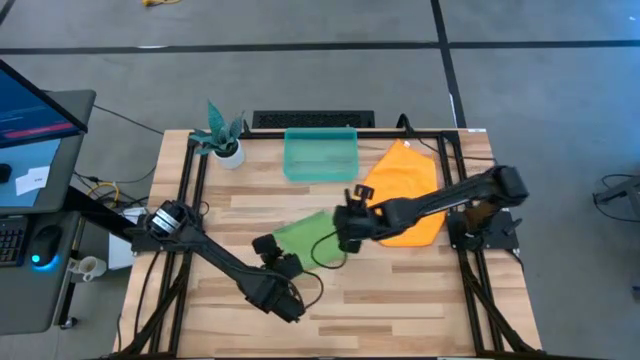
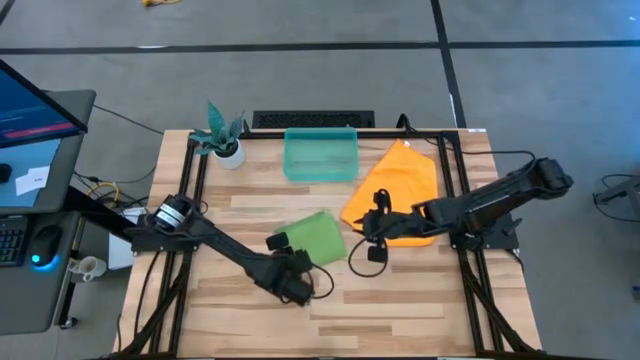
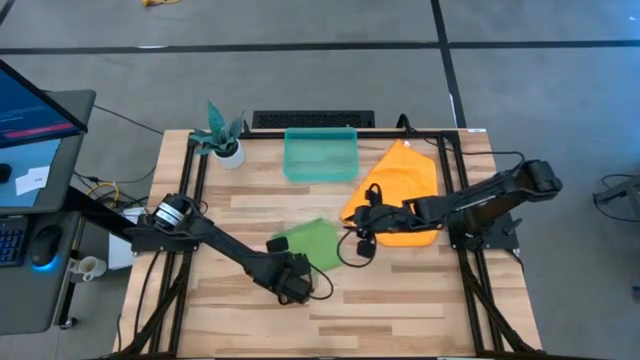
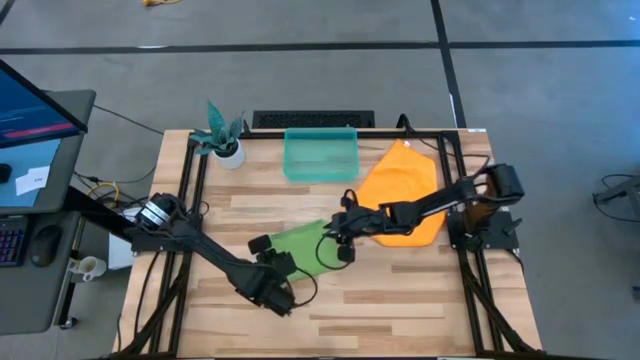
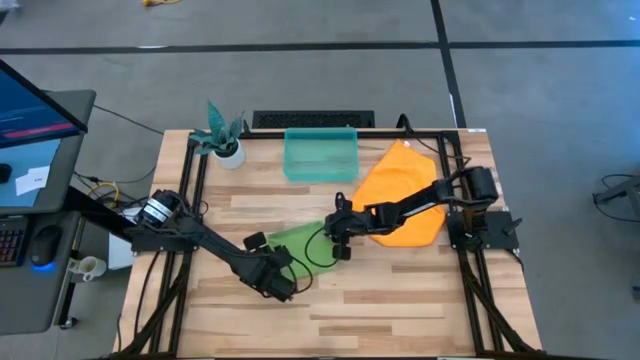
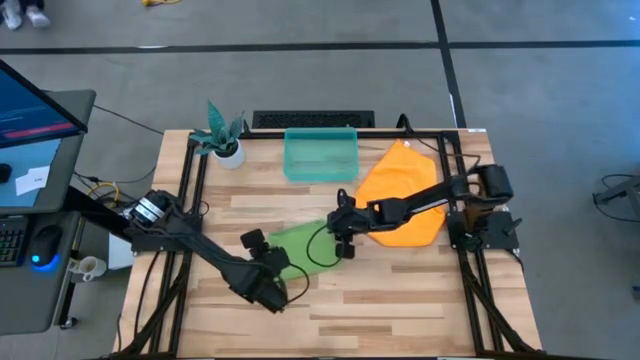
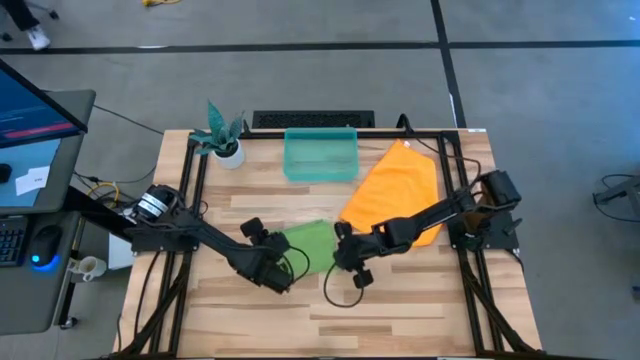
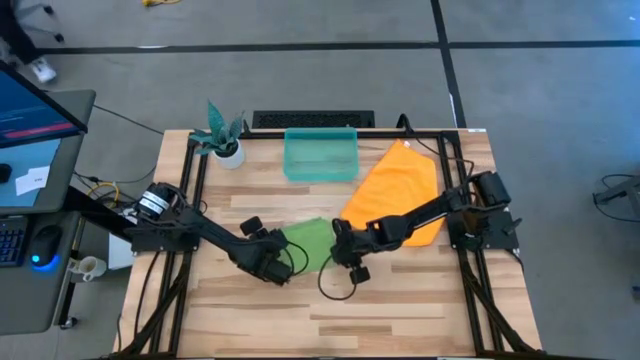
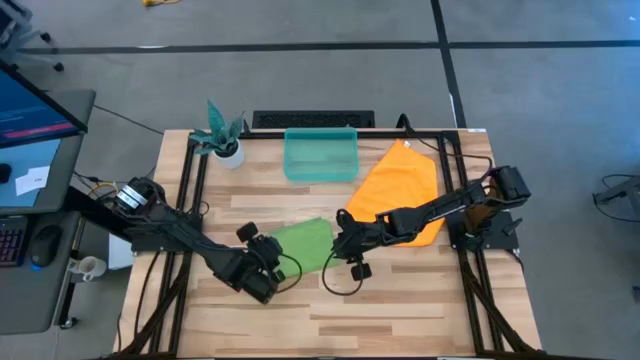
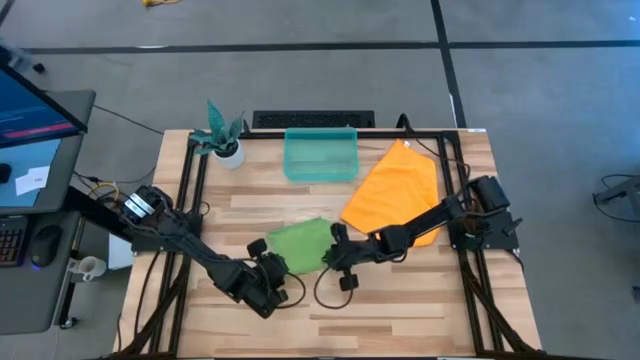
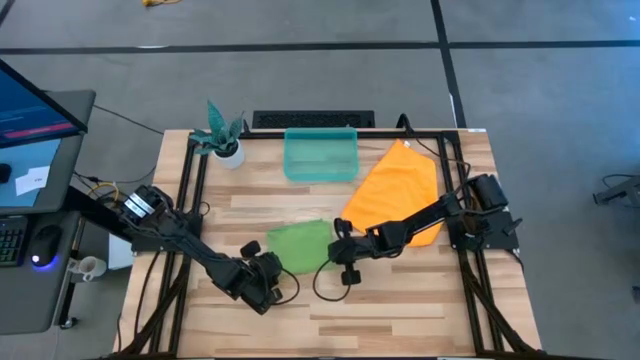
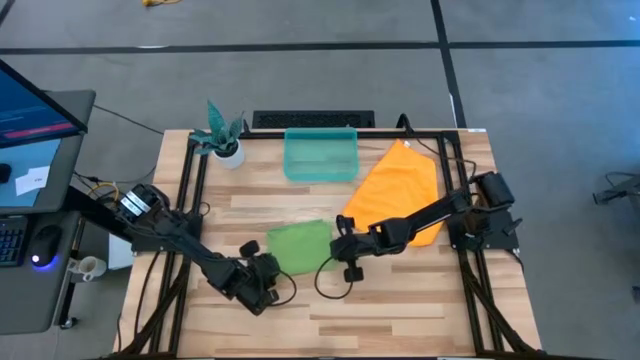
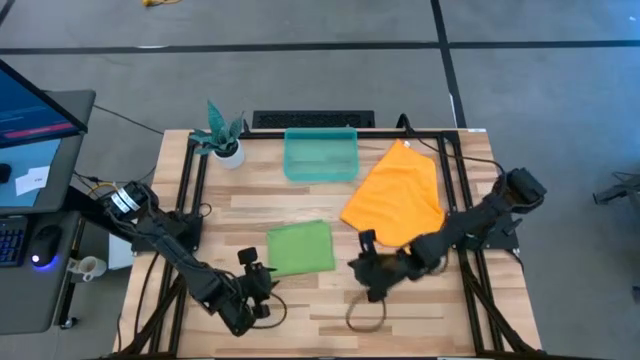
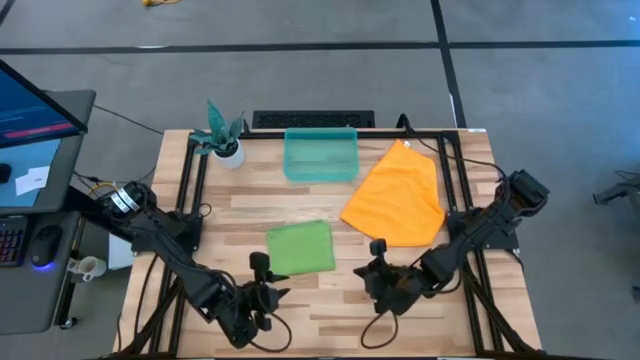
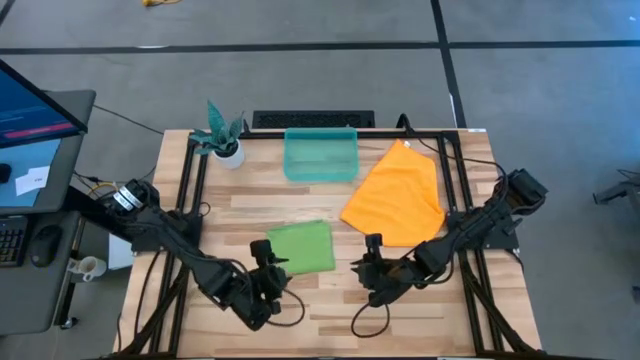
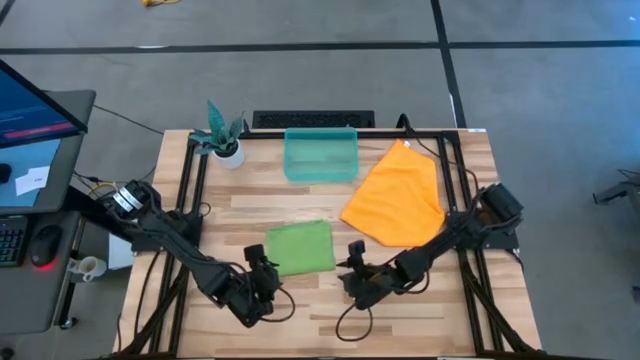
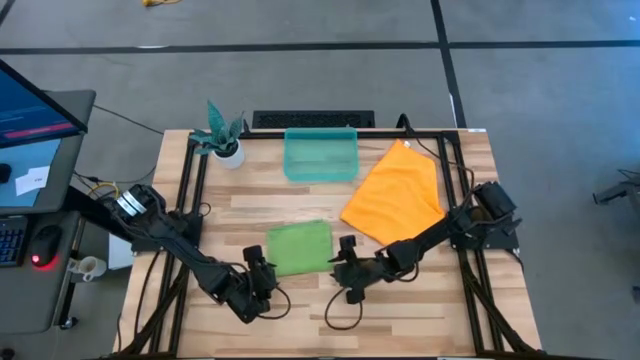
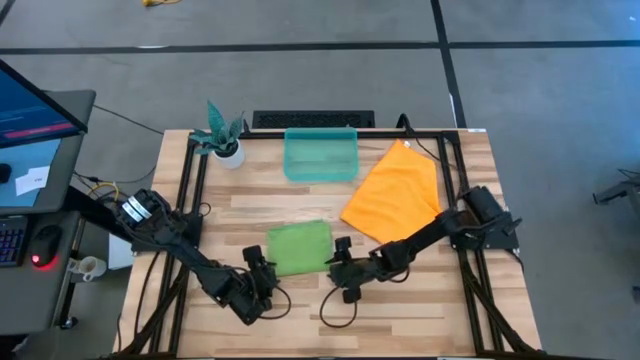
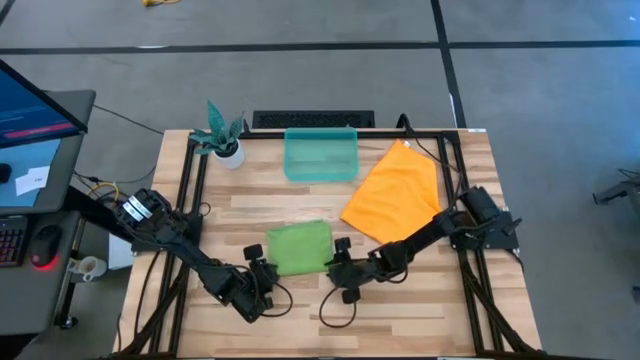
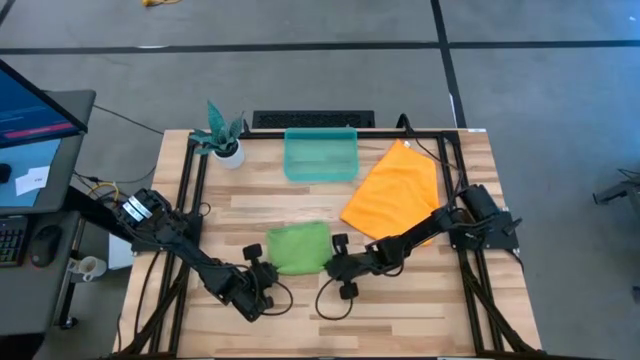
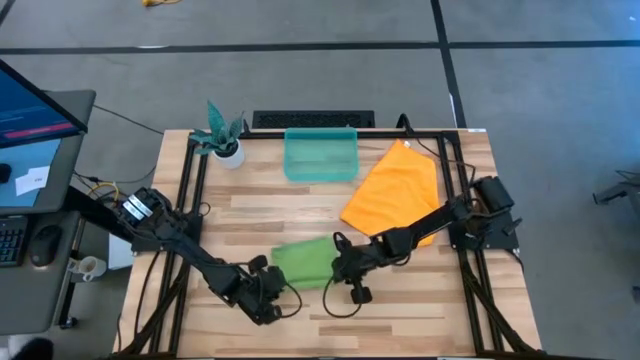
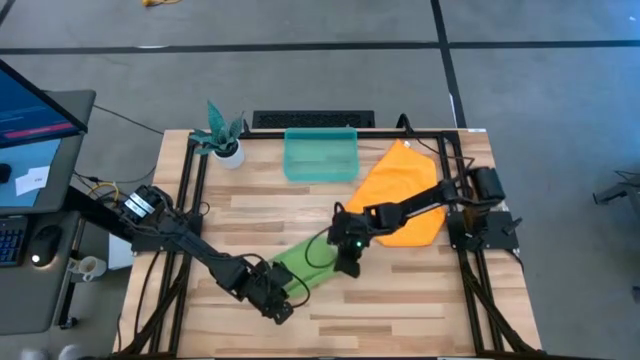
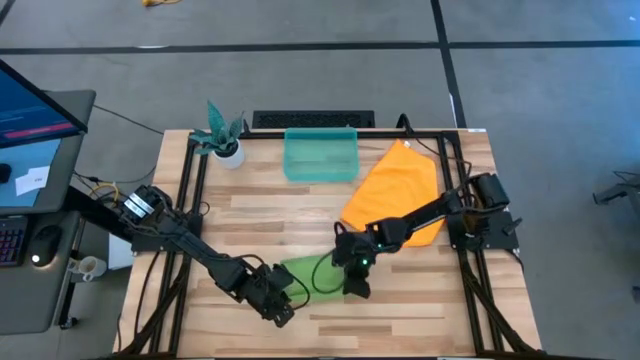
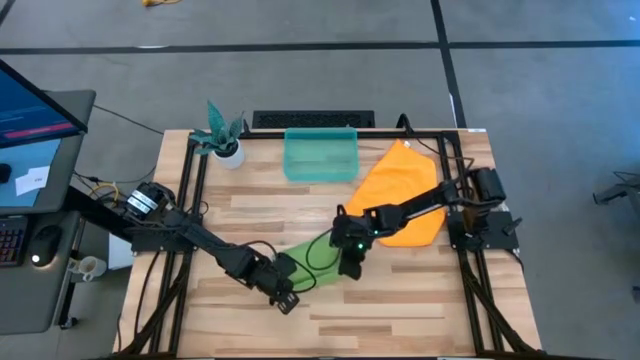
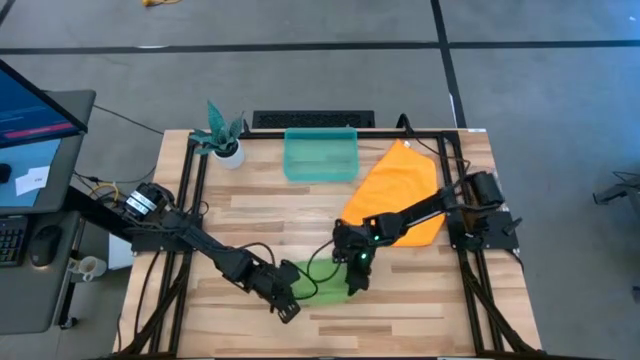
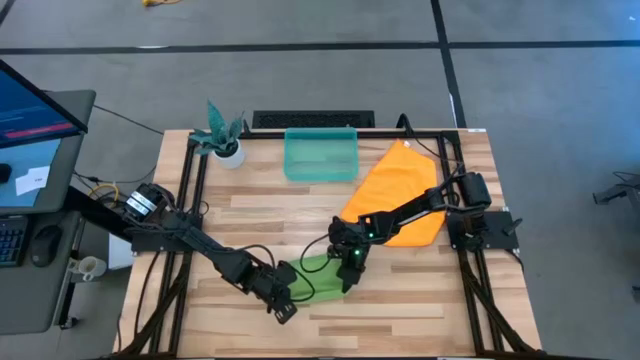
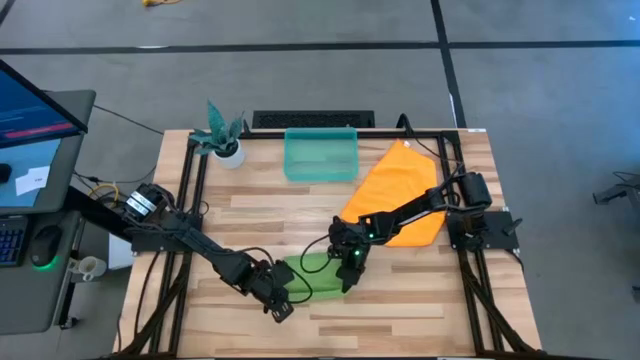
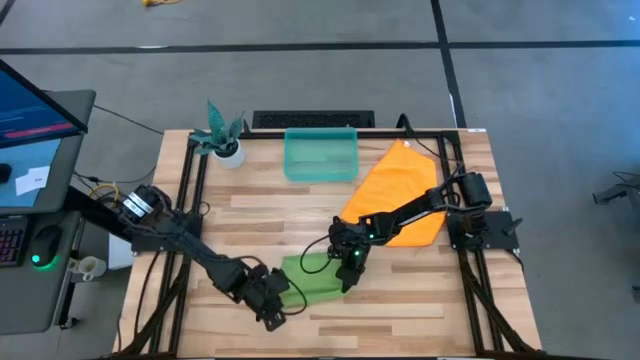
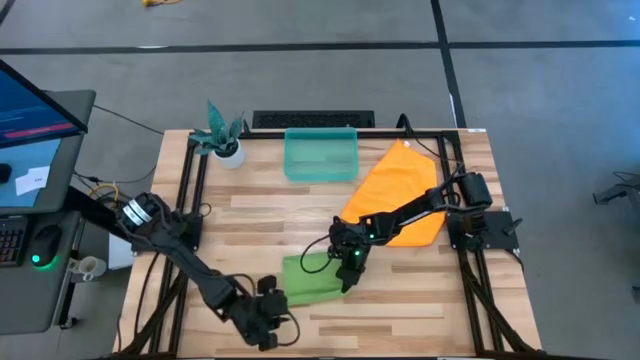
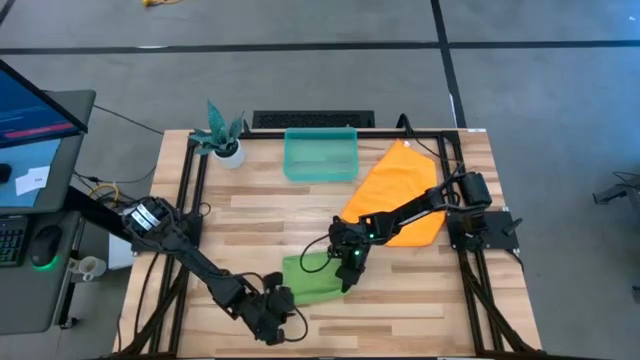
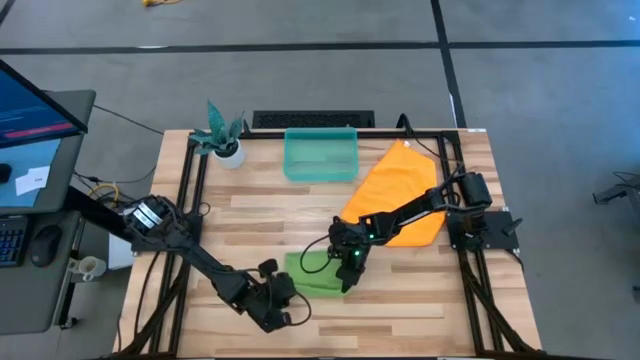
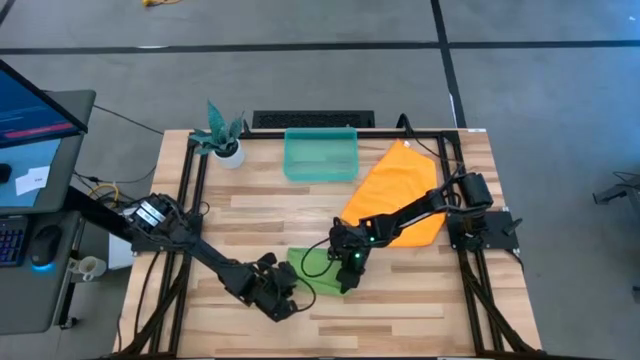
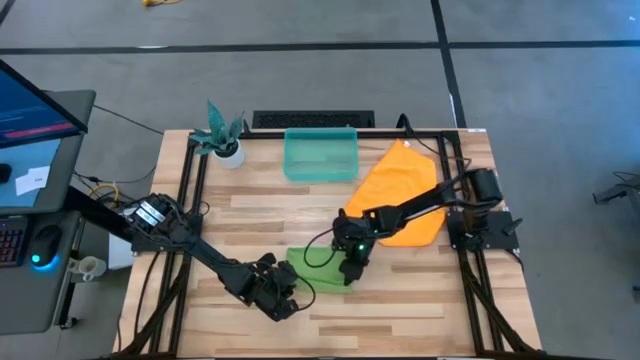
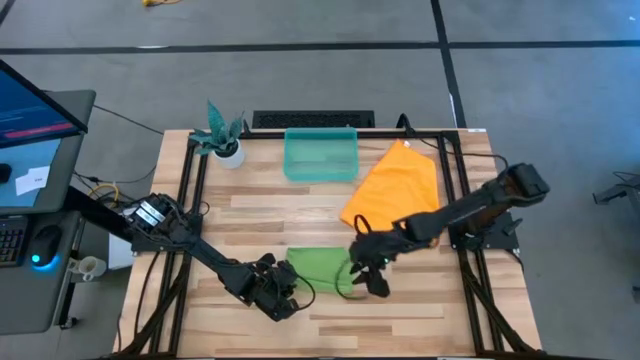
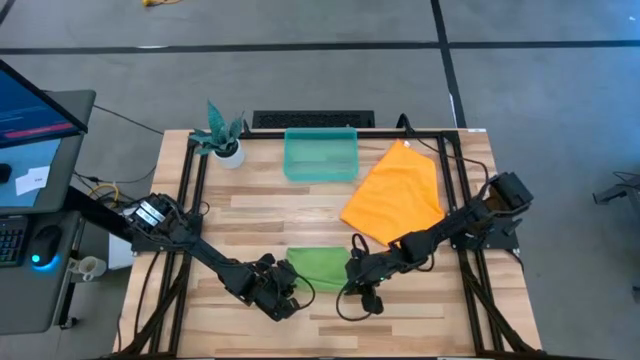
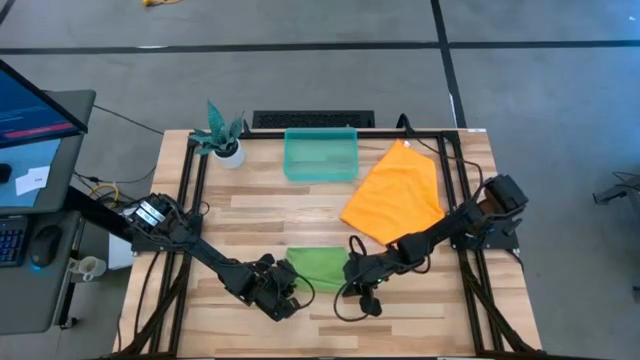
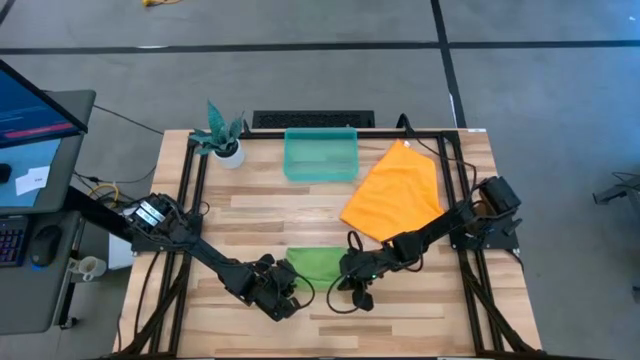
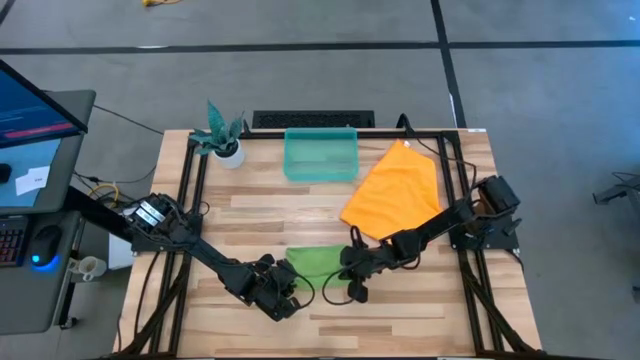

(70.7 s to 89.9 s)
Task: Roll microfiber towels into tight, uniform cylinder then place into a basket
Roll the green towel
